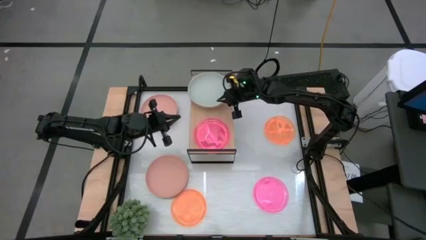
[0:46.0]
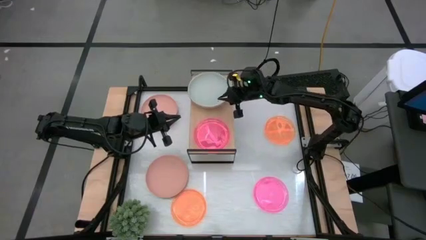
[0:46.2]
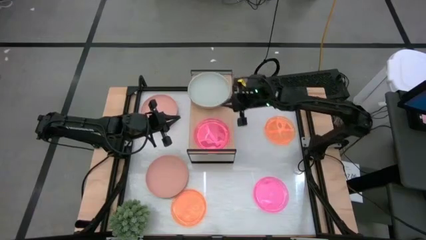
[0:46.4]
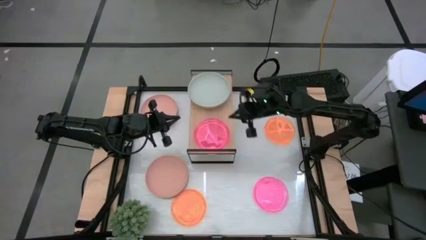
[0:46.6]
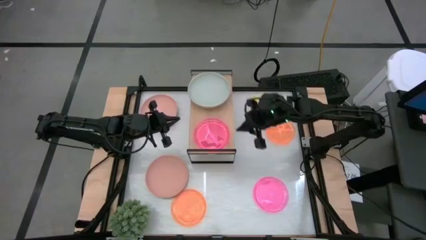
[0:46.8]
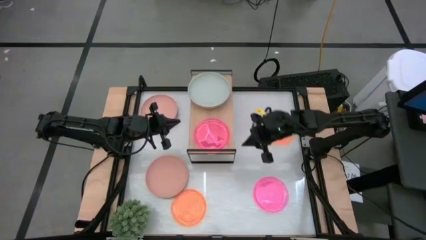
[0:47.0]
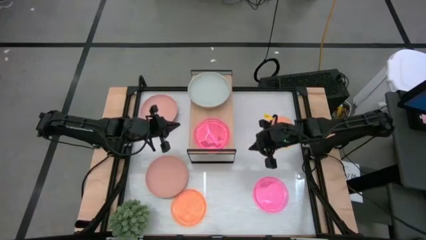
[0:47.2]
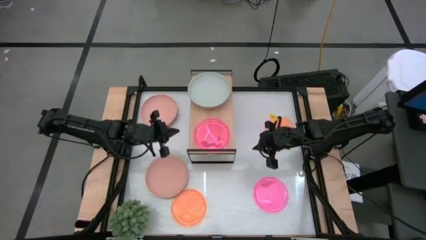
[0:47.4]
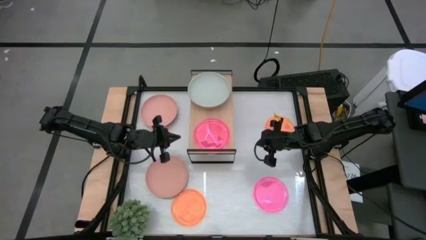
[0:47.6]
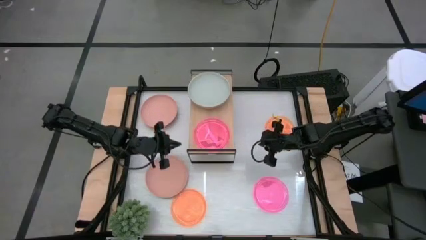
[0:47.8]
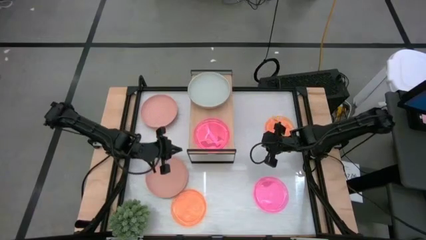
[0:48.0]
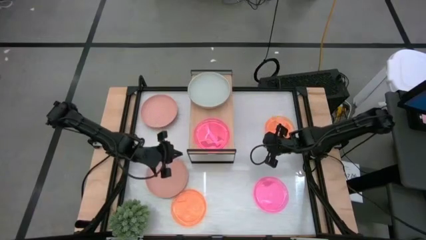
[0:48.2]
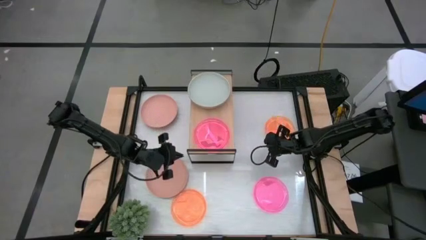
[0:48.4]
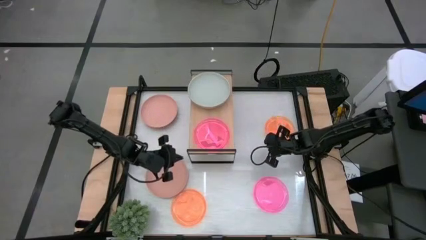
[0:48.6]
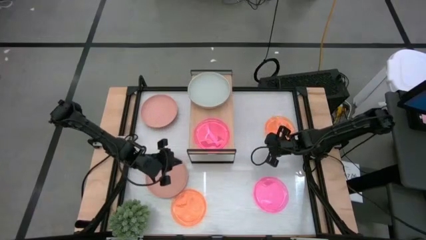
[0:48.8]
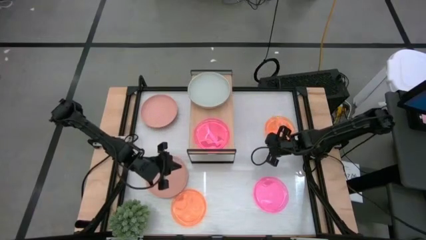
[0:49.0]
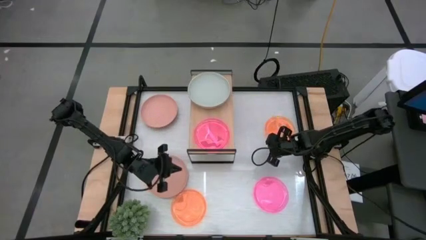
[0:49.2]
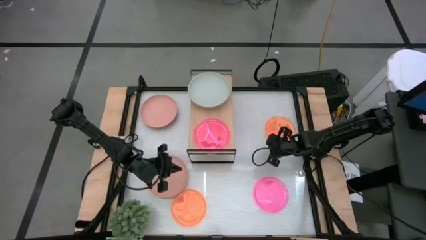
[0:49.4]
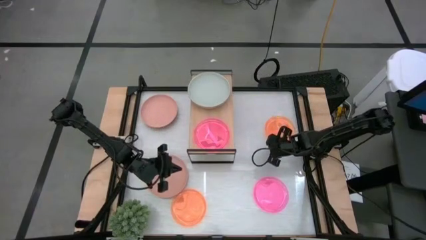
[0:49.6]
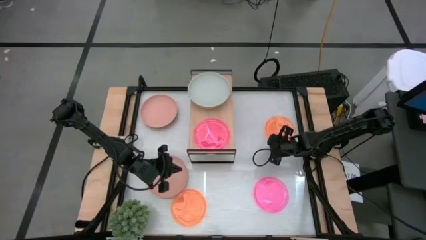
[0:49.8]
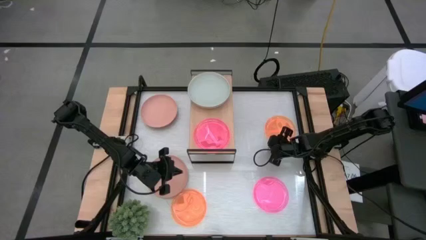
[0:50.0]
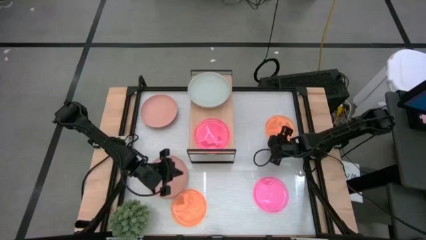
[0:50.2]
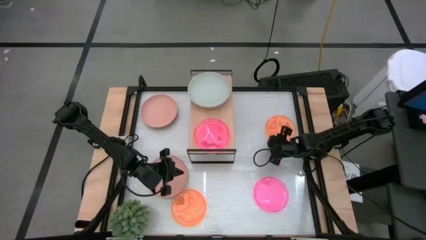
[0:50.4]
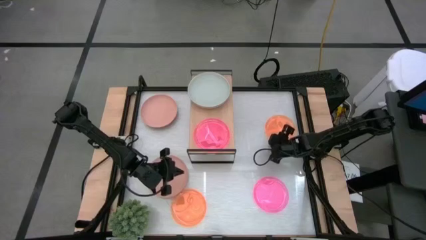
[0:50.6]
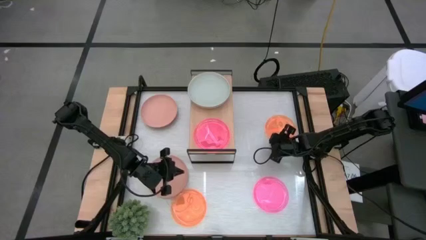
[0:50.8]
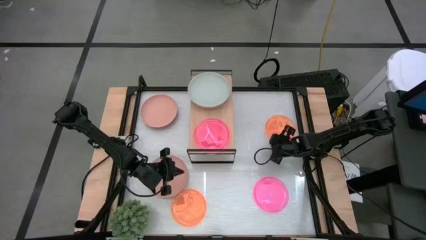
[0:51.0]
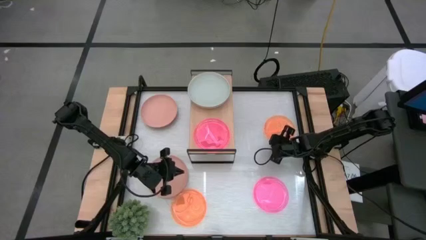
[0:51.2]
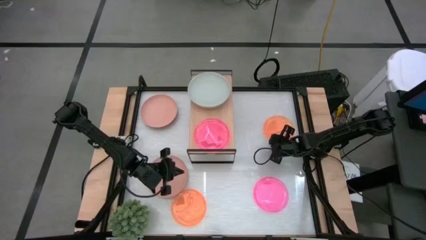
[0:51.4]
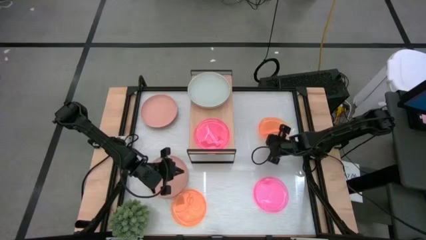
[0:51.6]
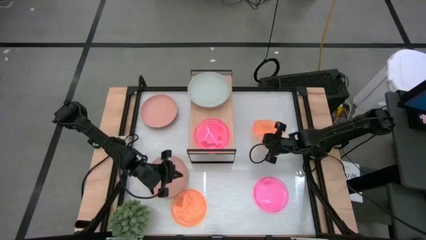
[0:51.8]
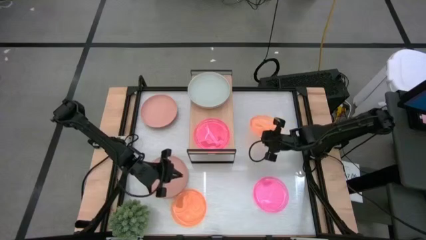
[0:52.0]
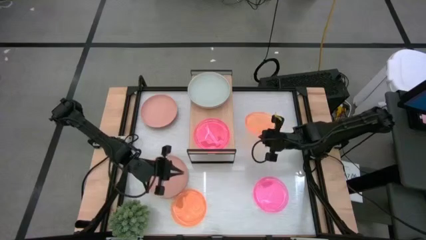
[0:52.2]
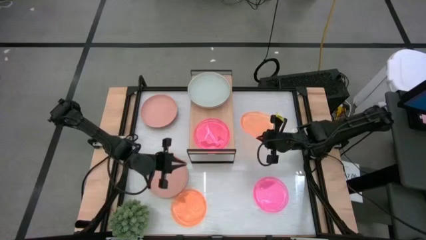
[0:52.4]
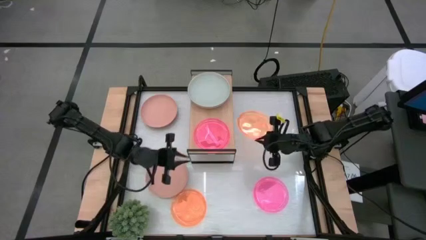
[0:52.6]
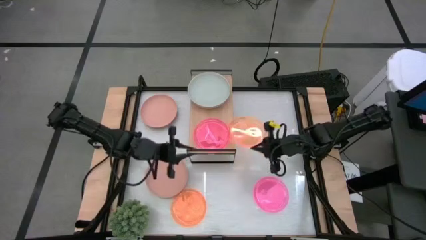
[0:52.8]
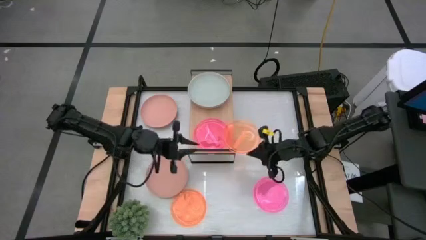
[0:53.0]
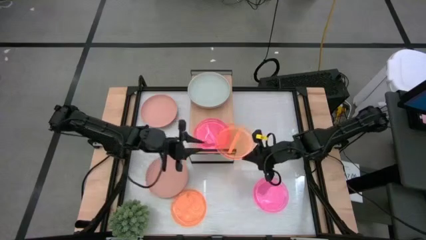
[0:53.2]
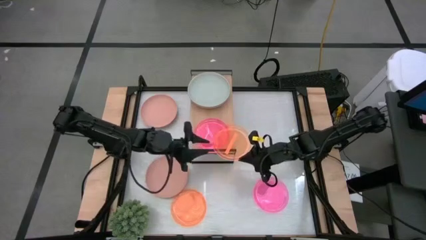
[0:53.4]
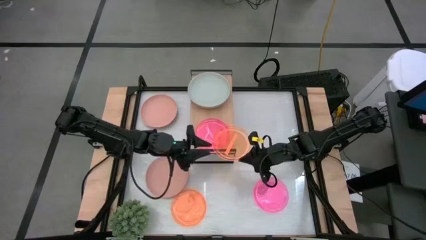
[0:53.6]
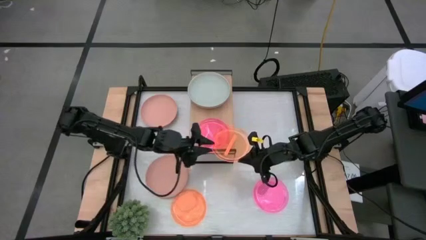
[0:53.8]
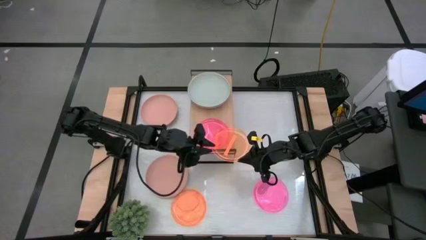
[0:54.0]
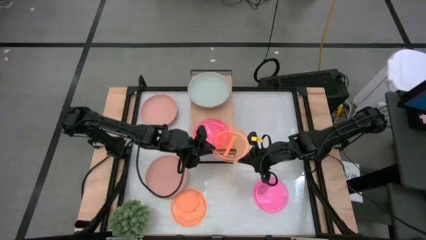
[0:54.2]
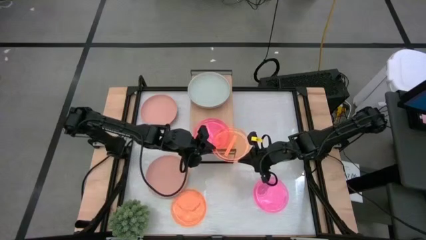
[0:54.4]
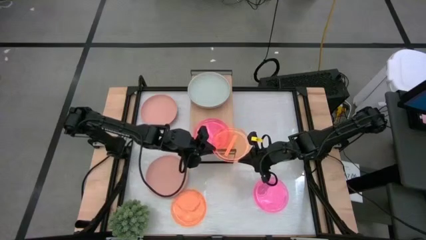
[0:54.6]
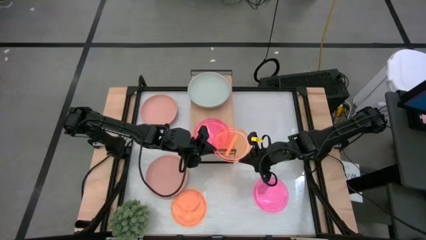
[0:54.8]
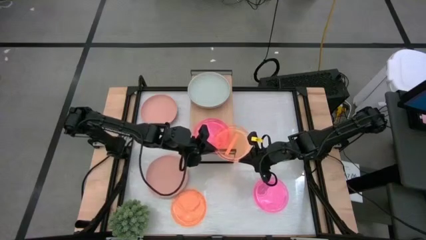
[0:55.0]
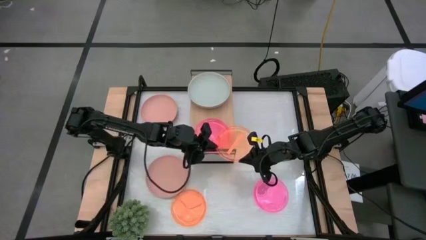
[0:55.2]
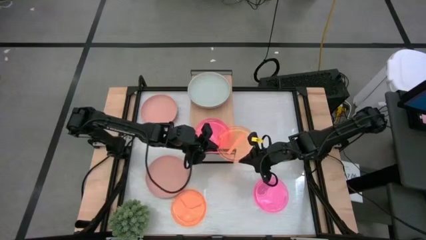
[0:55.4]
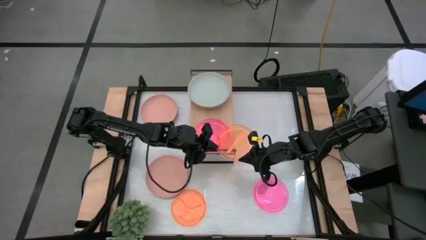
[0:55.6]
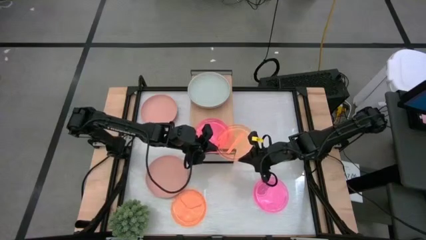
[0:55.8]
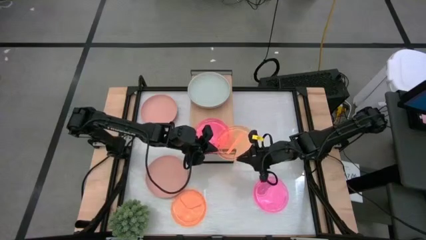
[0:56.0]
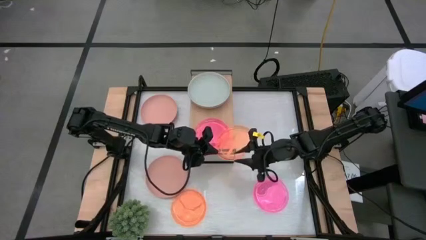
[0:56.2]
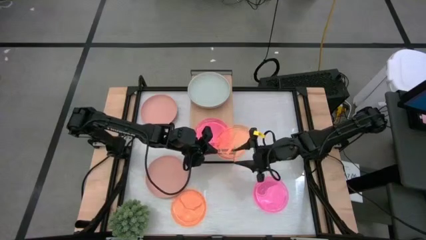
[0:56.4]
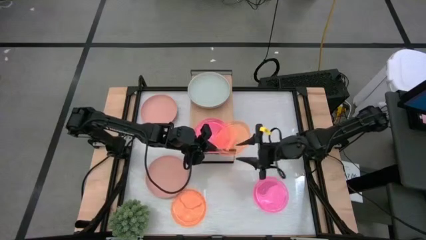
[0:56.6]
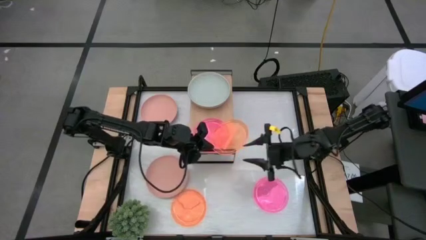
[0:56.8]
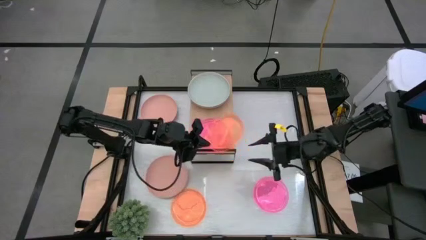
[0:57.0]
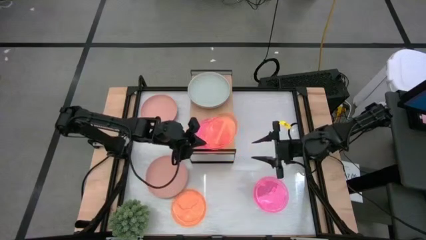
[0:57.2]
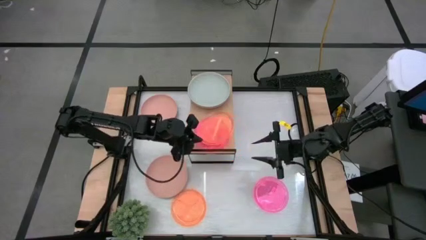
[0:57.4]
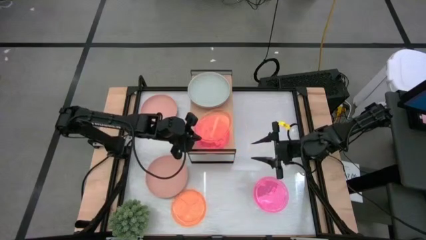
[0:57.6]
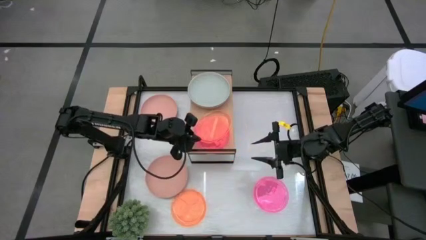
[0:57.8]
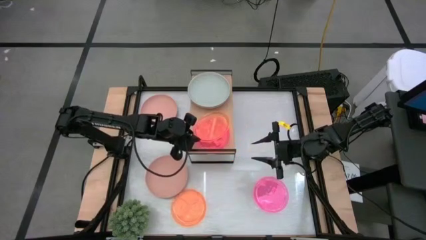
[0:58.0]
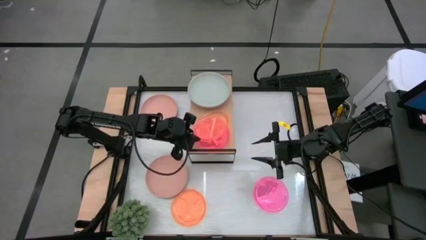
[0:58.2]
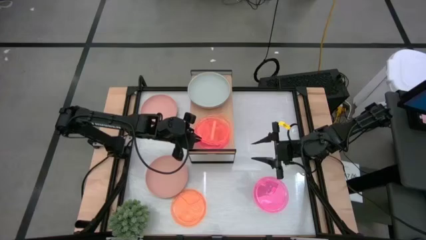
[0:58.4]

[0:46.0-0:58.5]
Task: Place and stack plates onto a shelf
Stack the top orange plate on top of the pink plate on the shelf
